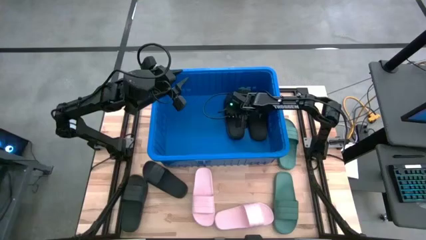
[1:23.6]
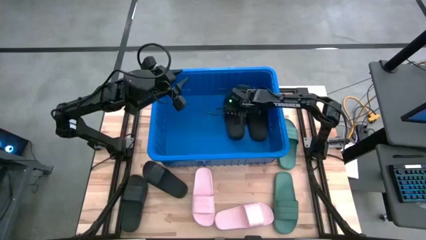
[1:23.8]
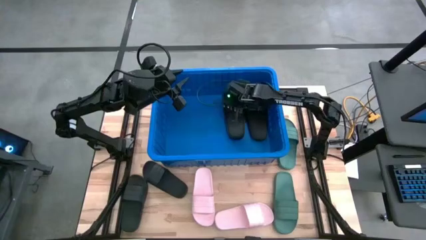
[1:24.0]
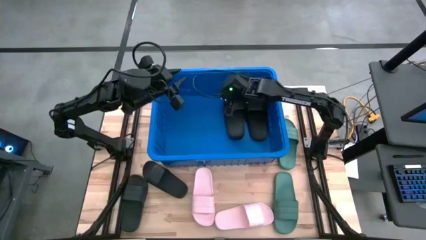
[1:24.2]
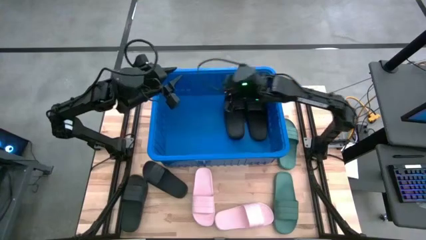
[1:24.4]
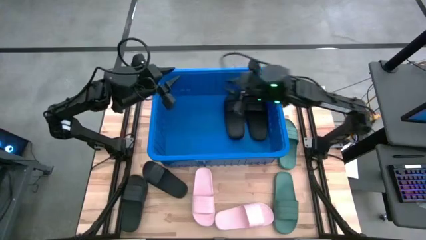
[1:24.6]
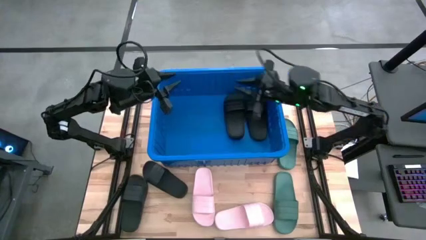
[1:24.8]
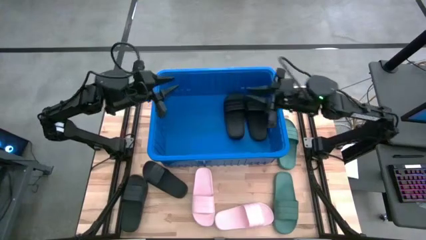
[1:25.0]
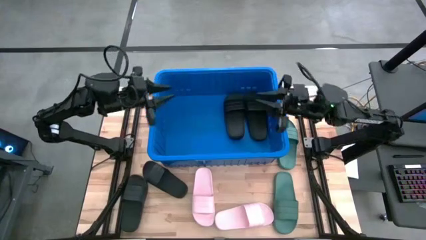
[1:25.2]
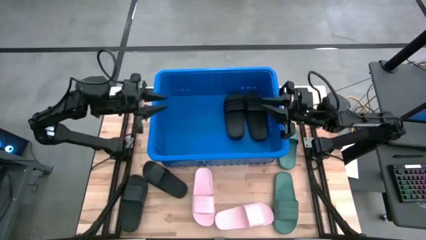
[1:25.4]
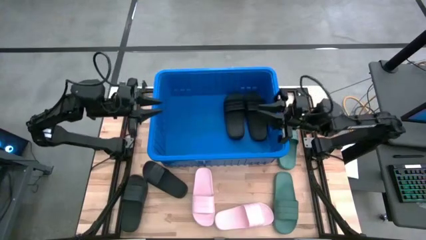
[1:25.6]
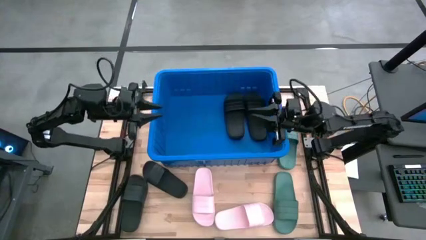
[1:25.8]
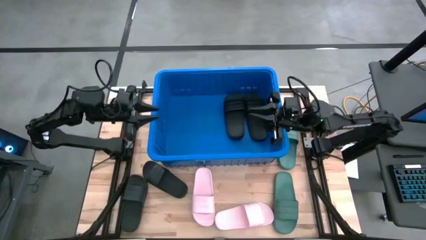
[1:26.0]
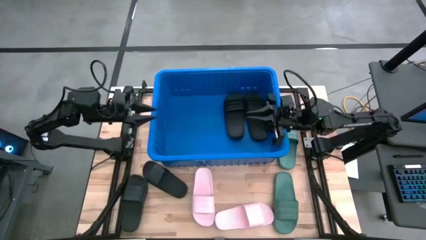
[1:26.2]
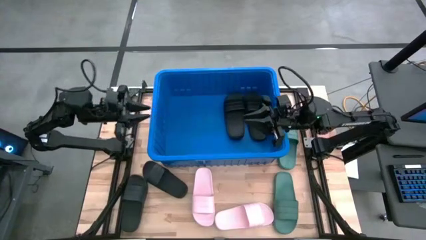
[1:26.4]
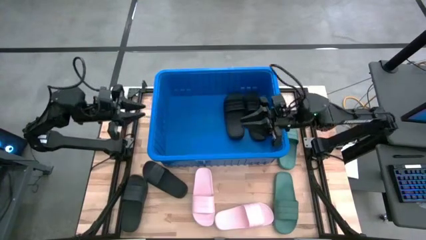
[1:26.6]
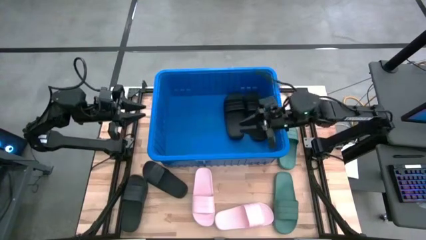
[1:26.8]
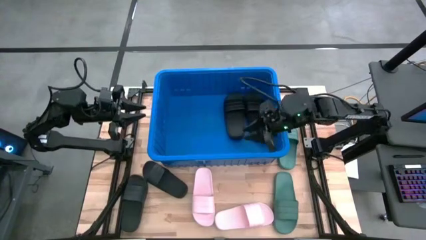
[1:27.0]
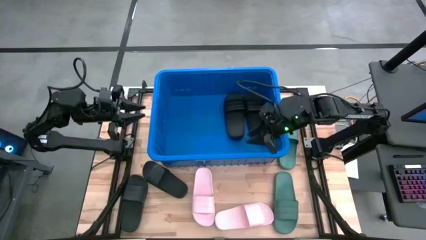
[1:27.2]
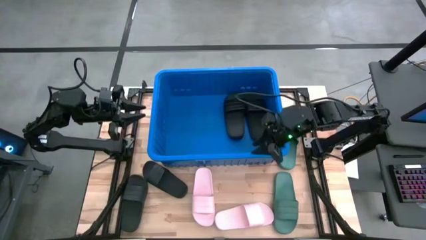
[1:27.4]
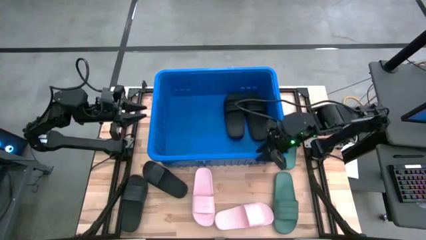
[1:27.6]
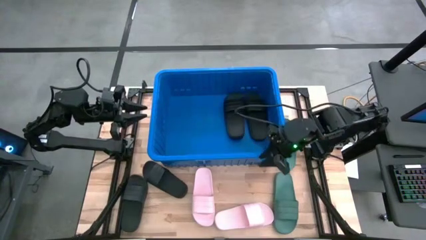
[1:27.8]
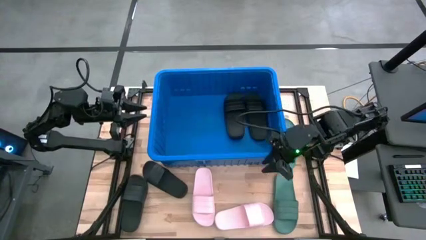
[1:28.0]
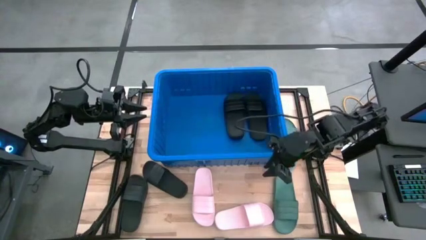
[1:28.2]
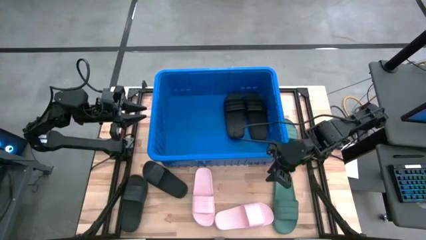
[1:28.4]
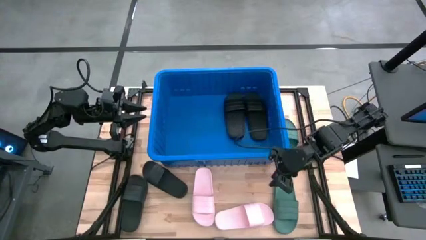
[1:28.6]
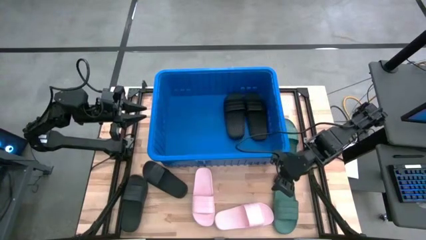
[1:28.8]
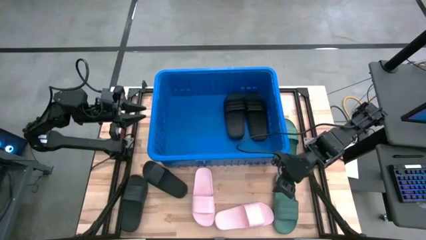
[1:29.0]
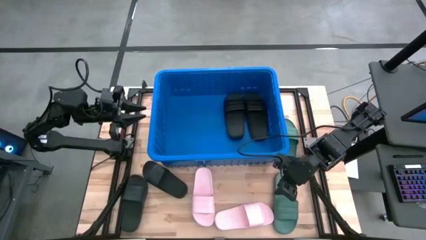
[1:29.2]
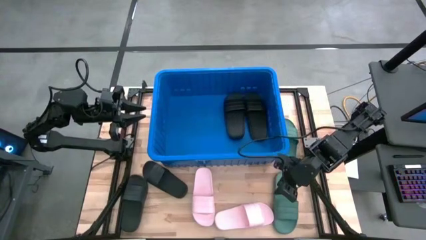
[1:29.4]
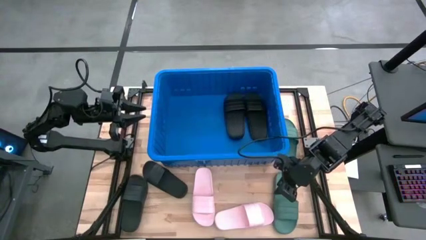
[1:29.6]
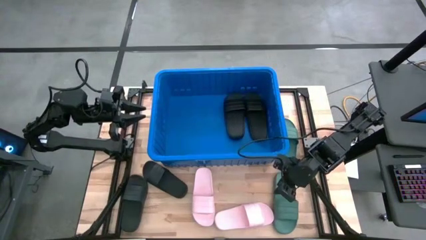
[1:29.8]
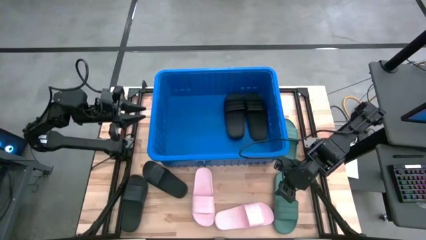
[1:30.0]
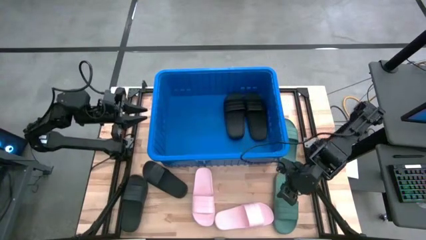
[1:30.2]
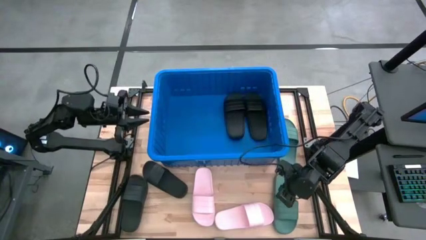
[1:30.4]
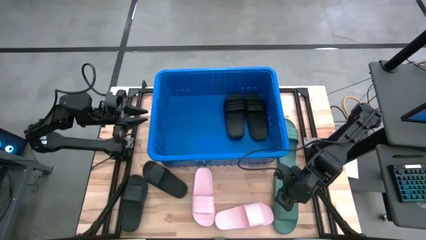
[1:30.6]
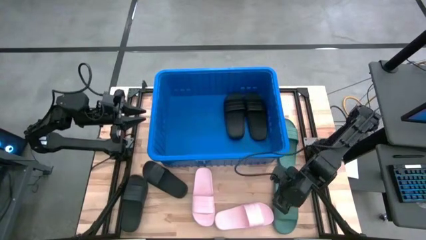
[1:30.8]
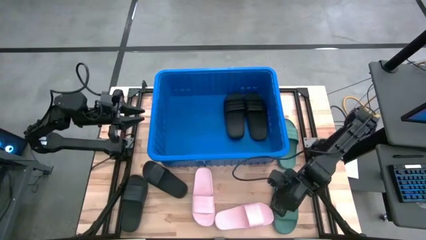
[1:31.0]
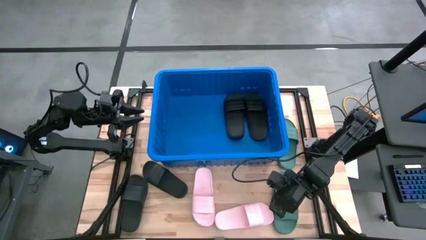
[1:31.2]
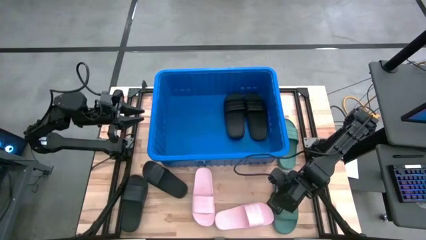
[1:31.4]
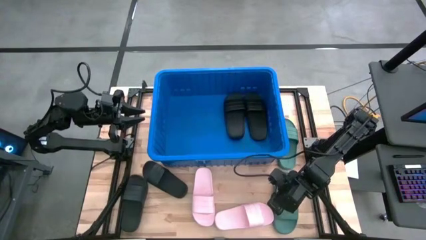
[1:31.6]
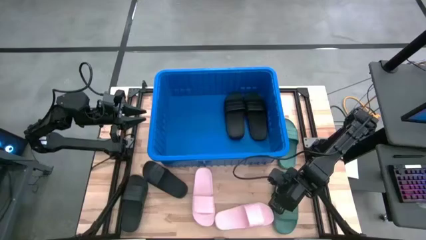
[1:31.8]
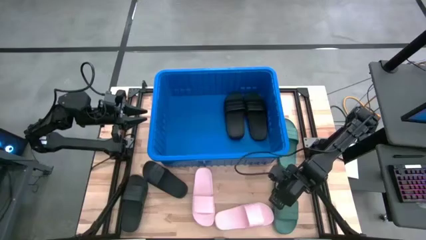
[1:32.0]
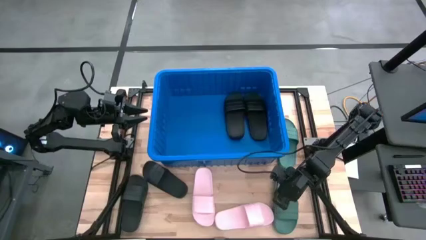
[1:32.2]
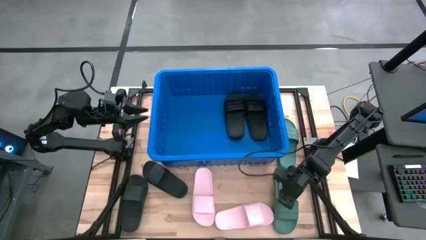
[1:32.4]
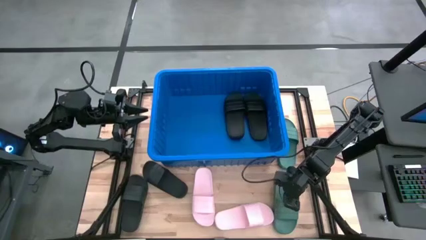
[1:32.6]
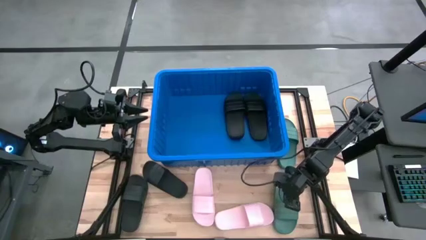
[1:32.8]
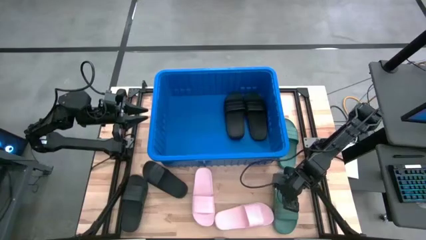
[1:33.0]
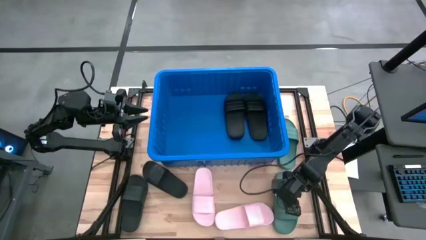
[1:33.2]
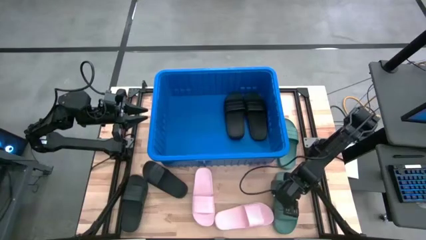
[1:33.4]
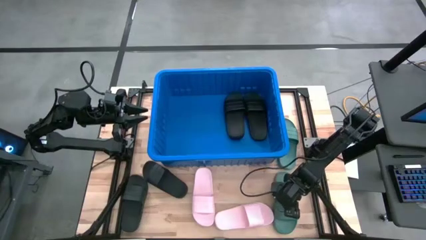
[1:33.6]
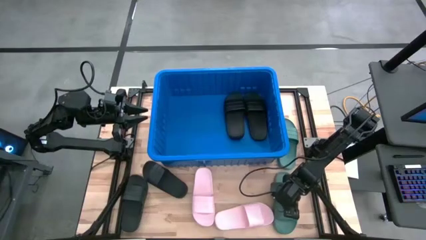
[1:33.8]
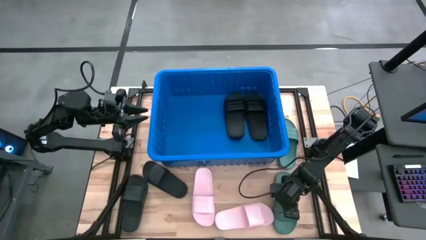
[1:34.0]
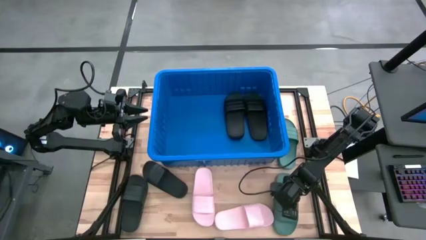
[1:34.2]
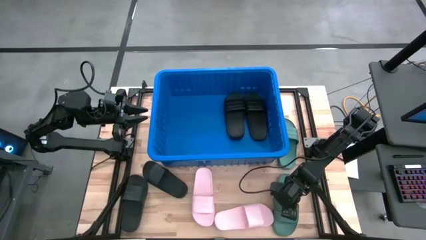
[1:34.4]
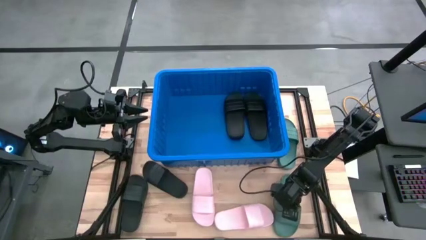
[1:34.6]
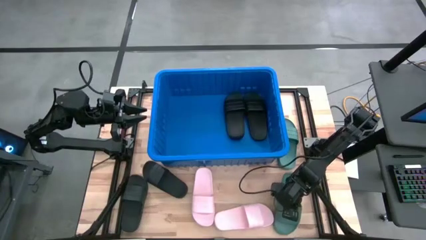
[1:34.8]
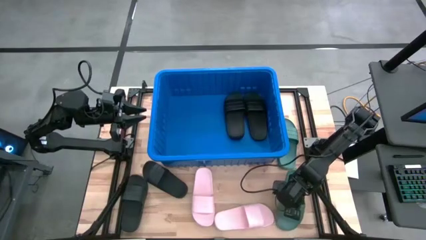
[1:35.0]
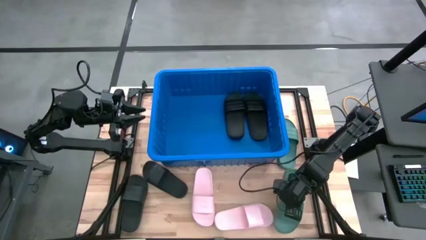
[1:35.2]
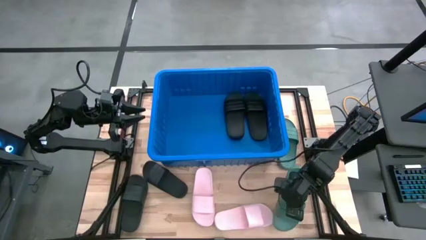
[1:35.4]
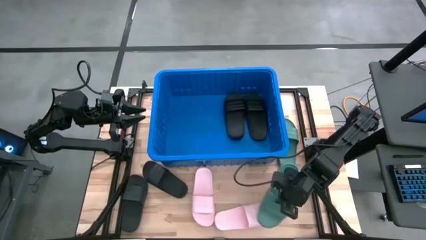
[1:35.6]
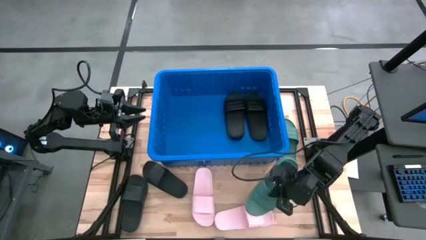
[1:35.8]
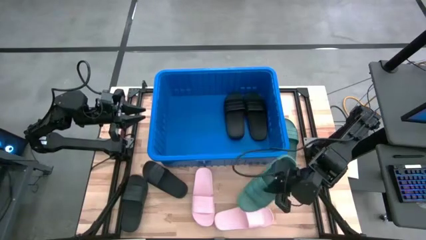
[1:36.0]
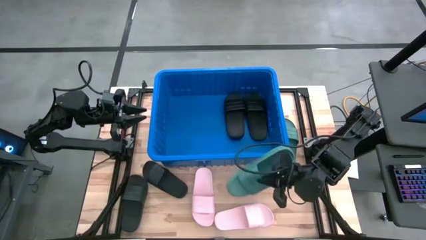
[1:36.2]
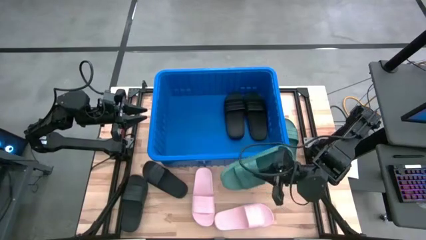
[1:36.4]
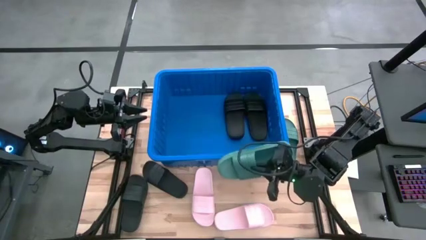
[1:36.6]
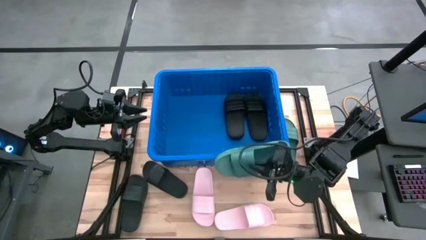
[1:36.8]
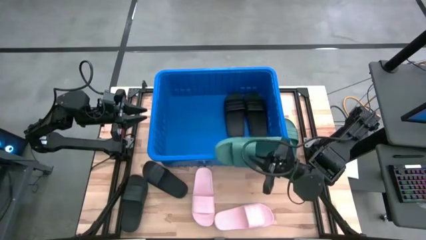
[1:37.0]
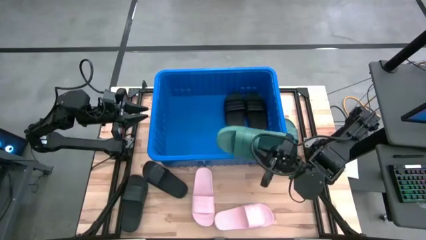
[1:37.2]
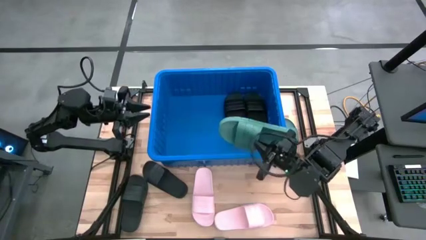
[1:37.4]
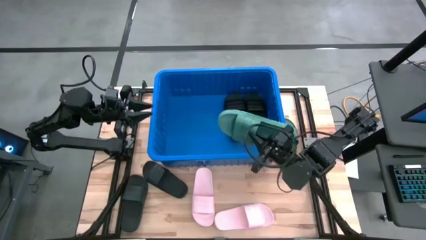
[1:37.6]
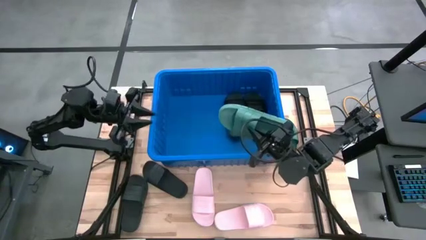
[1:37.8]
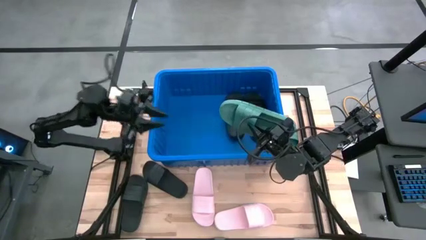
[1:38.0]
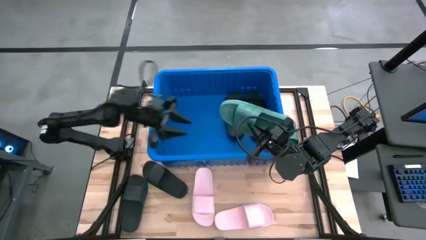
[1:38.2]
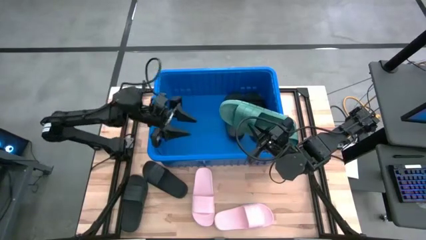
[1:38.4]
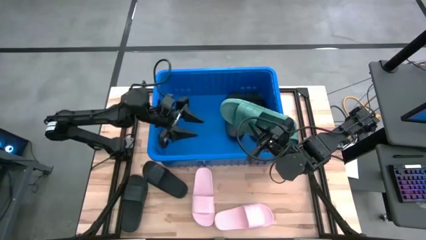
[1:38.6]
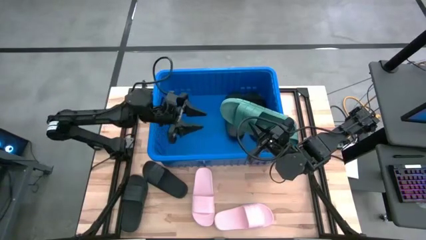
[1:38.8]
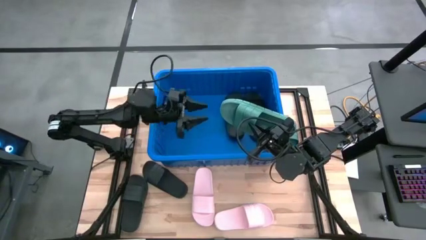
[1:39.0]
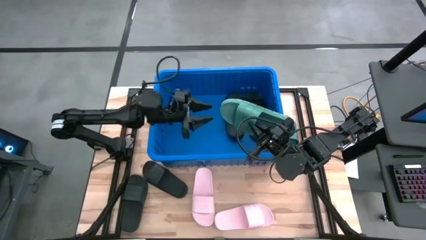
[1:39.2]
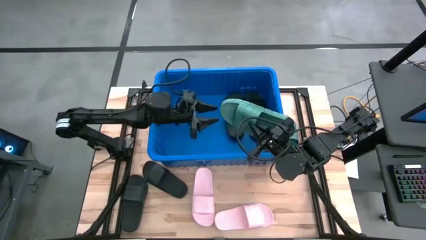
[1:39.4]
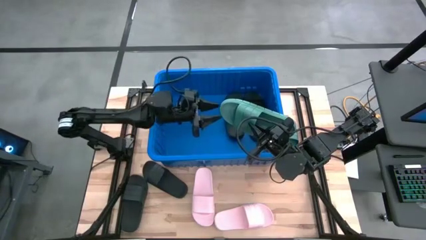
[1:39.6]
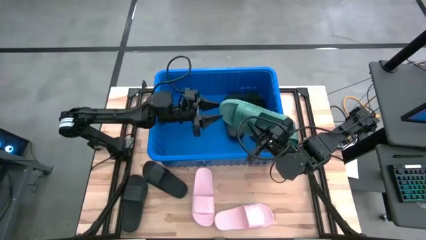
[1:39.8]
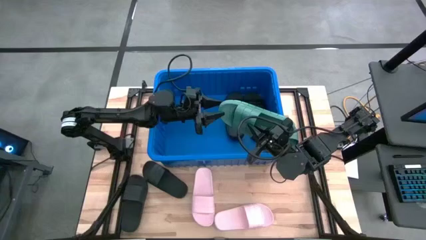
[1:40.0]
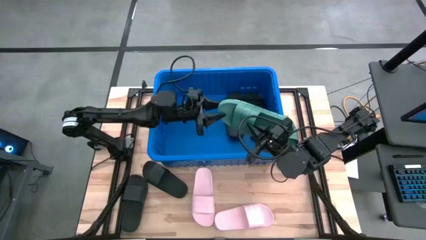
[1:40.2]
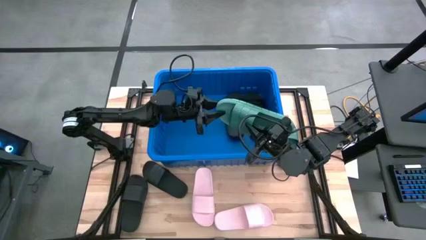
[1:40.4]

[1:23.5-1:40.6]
Task: Pick and place slides into bin
Put the bottom green slide into the blue bin
